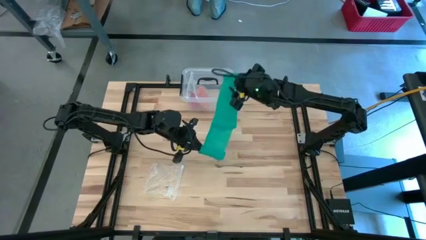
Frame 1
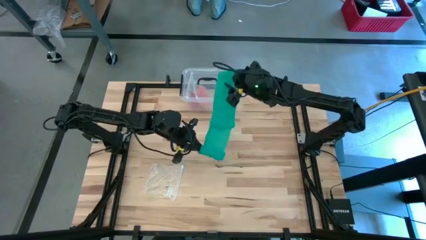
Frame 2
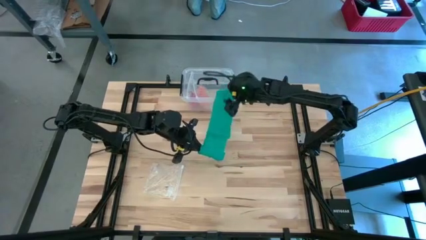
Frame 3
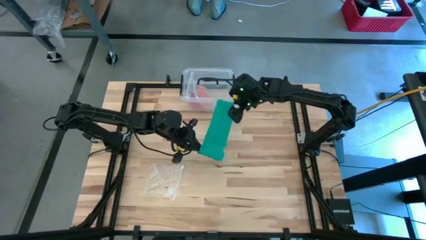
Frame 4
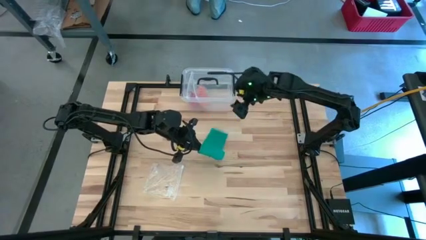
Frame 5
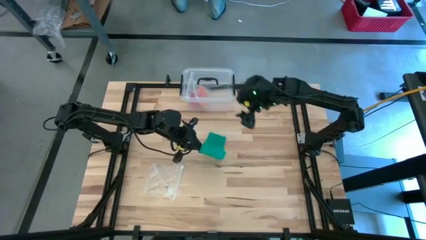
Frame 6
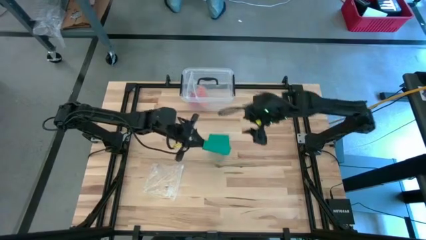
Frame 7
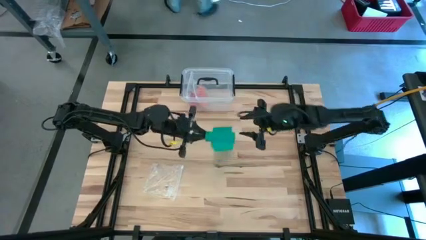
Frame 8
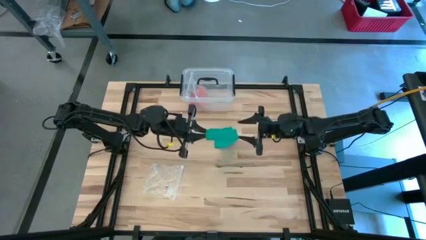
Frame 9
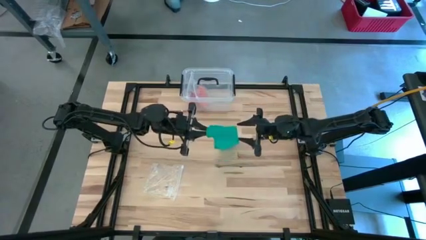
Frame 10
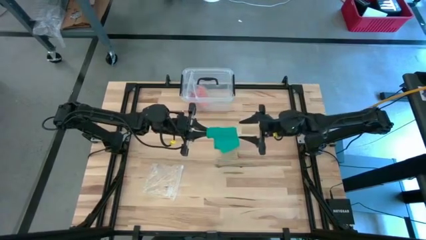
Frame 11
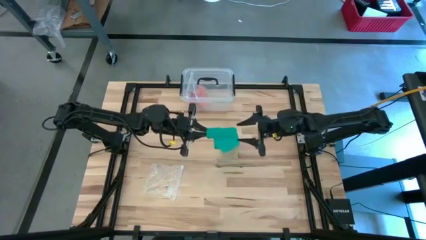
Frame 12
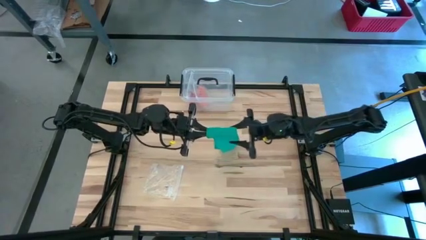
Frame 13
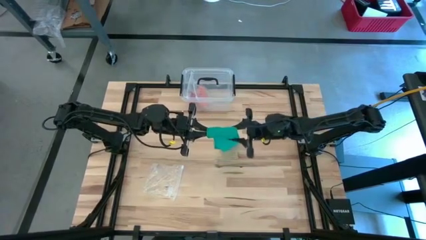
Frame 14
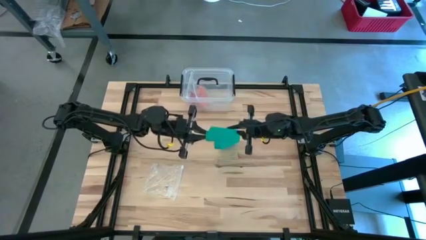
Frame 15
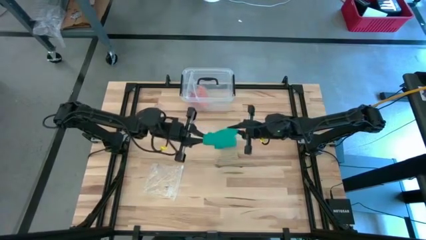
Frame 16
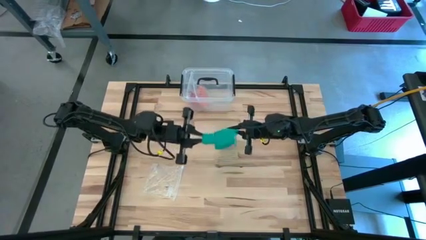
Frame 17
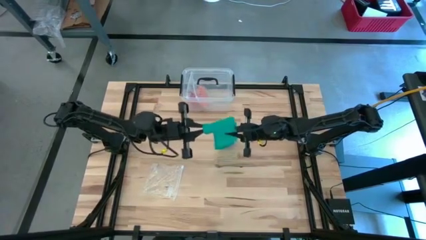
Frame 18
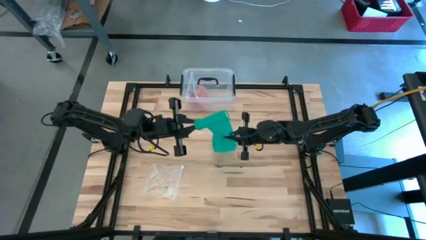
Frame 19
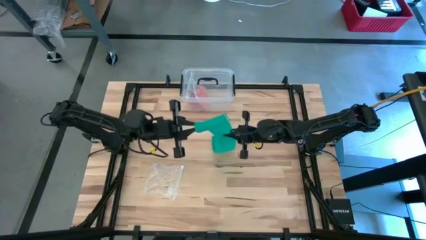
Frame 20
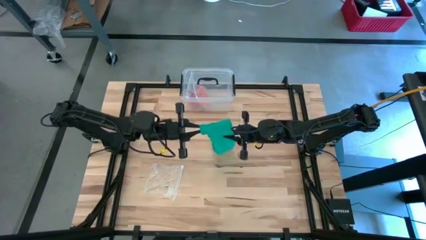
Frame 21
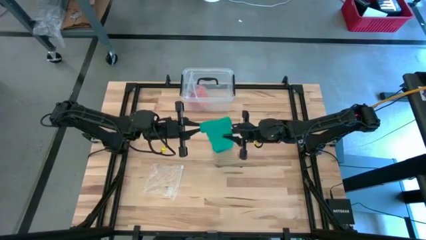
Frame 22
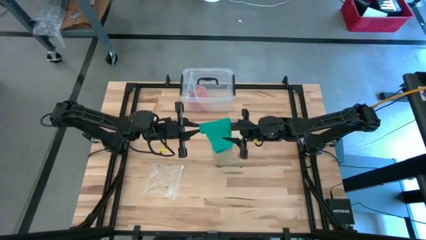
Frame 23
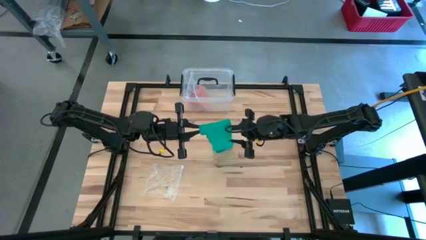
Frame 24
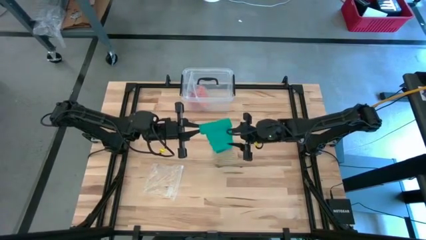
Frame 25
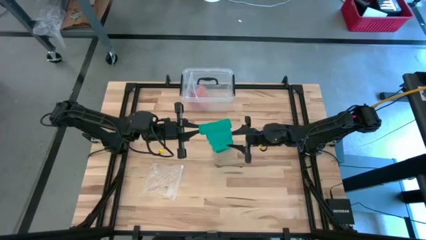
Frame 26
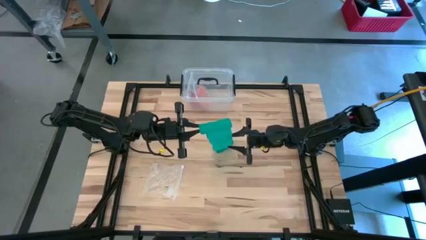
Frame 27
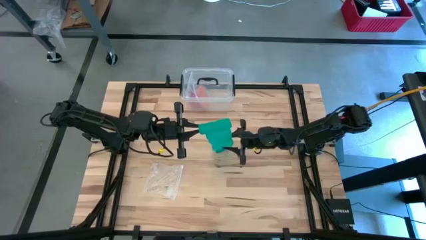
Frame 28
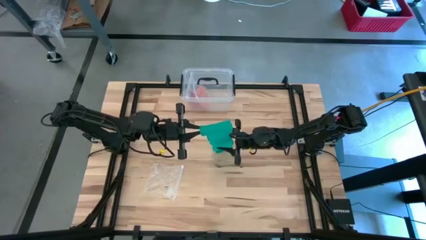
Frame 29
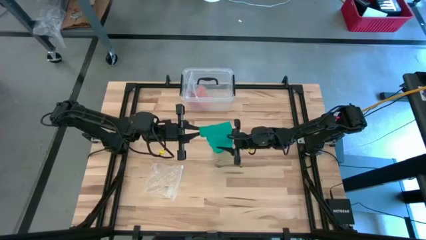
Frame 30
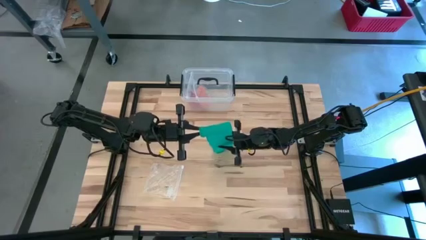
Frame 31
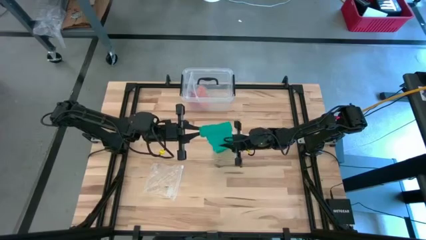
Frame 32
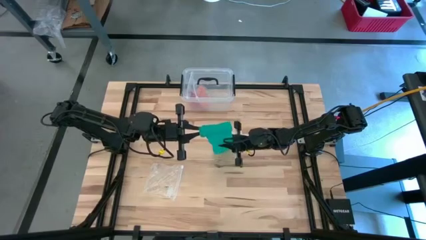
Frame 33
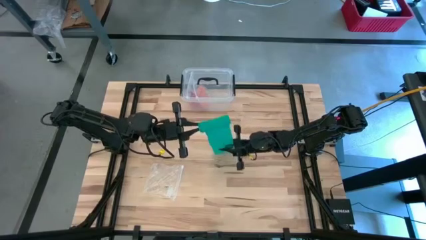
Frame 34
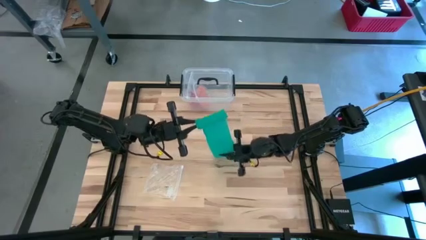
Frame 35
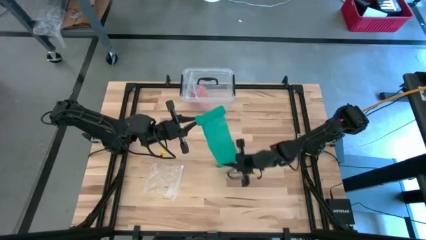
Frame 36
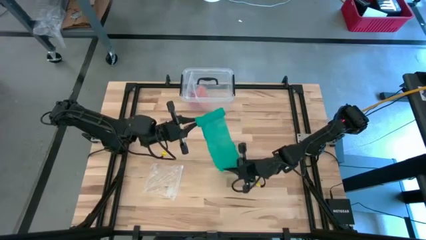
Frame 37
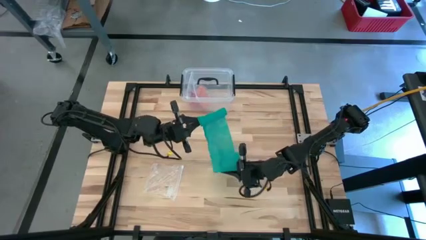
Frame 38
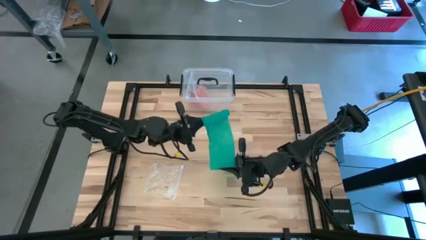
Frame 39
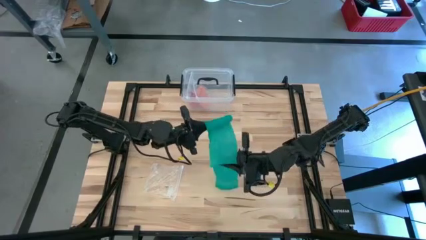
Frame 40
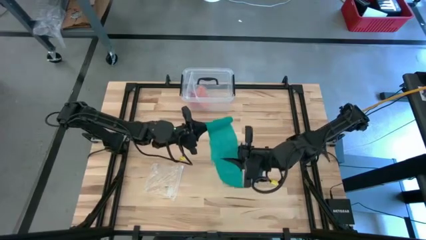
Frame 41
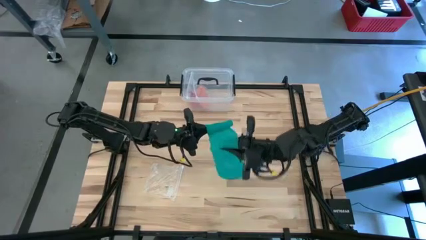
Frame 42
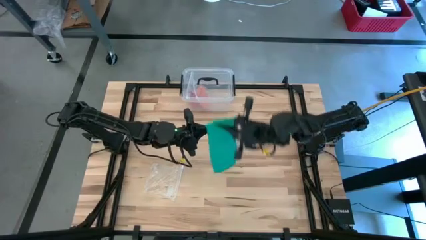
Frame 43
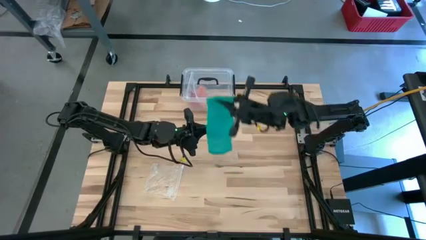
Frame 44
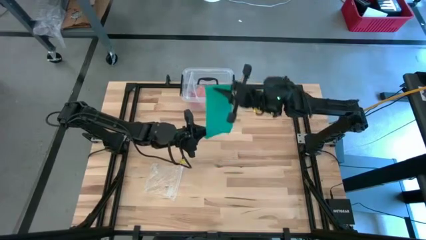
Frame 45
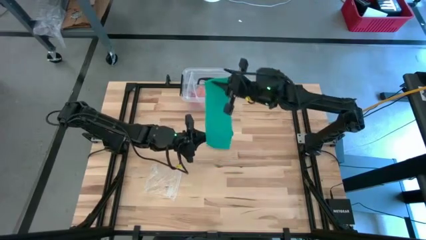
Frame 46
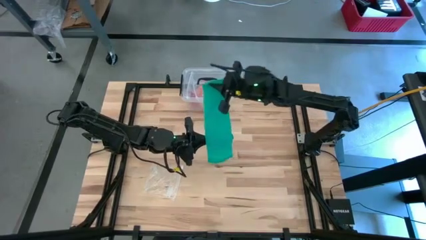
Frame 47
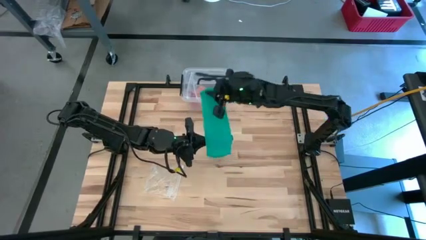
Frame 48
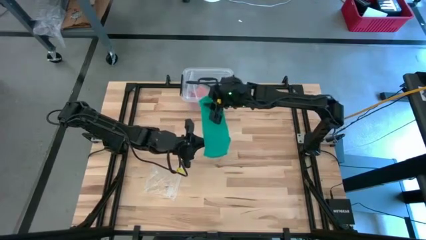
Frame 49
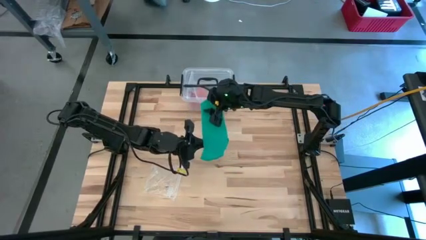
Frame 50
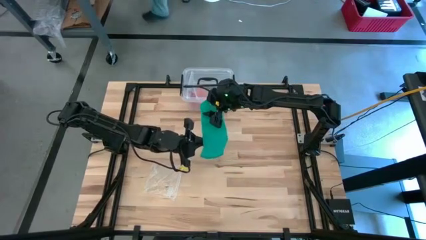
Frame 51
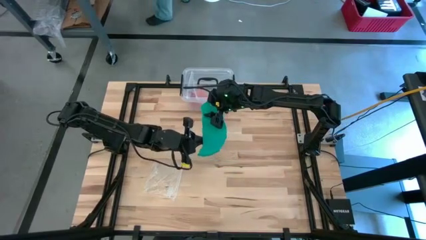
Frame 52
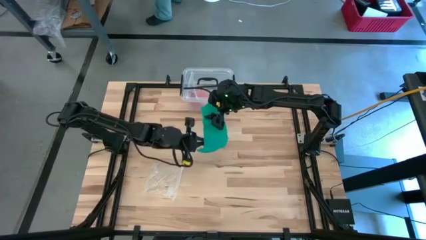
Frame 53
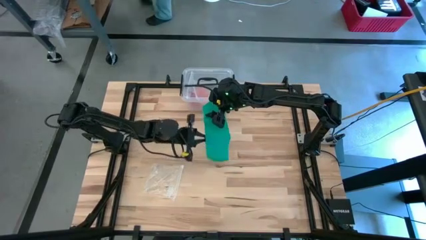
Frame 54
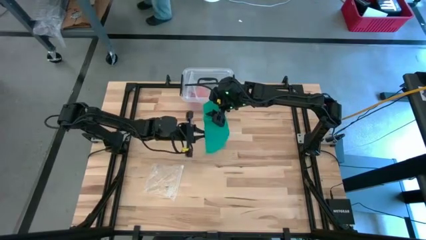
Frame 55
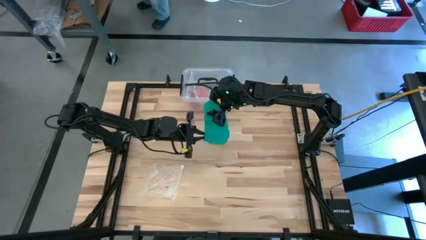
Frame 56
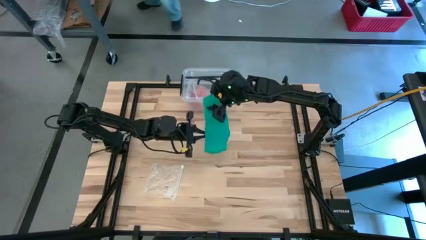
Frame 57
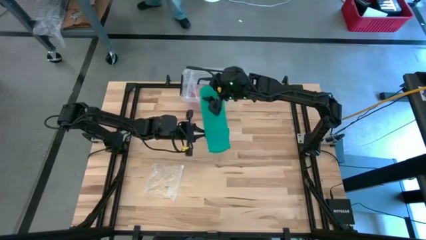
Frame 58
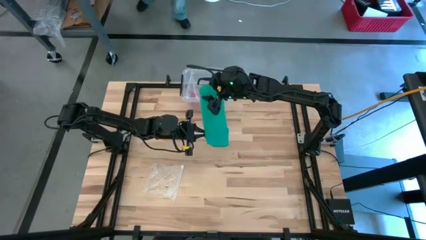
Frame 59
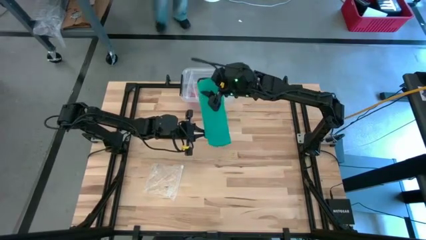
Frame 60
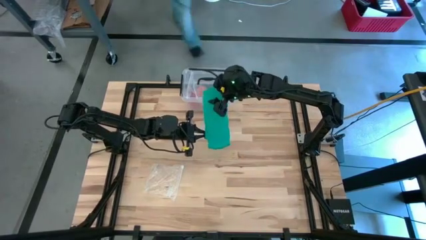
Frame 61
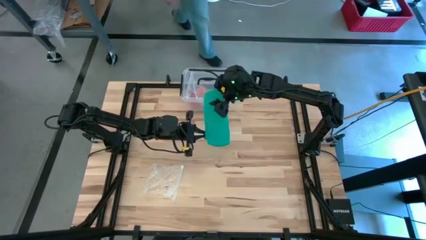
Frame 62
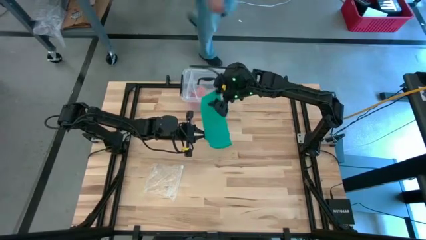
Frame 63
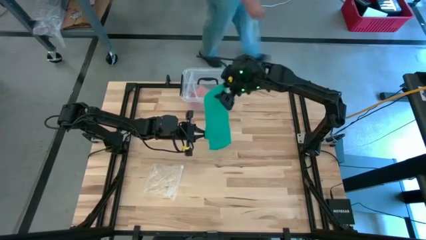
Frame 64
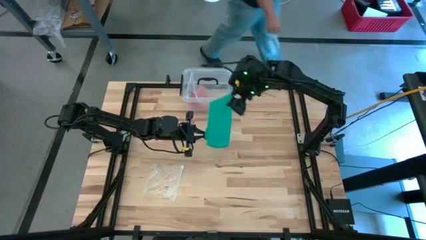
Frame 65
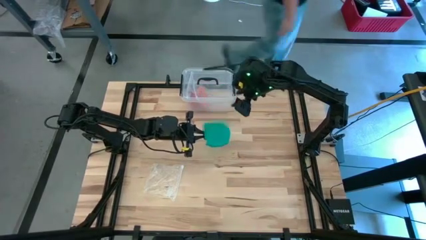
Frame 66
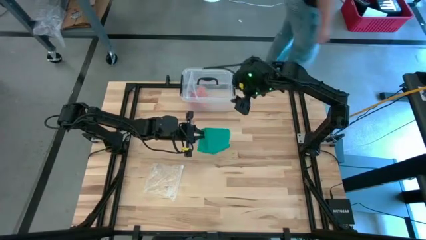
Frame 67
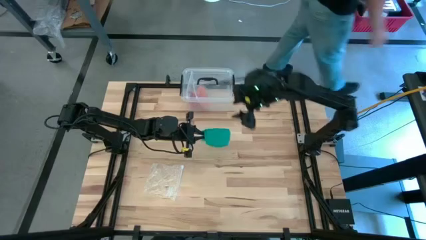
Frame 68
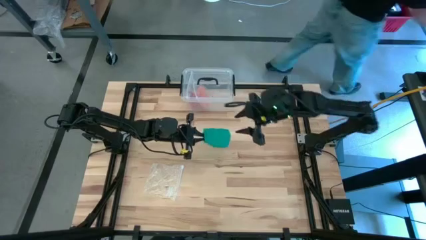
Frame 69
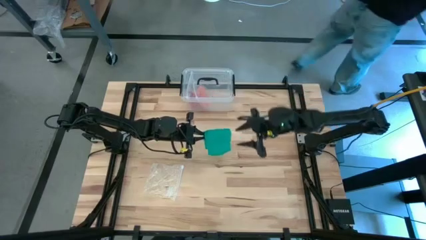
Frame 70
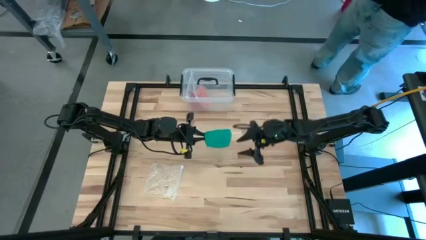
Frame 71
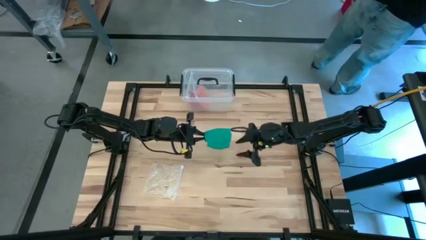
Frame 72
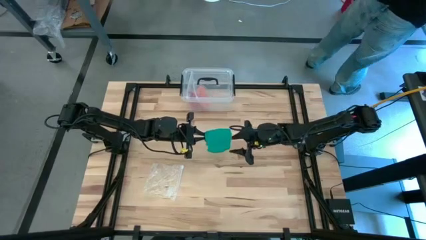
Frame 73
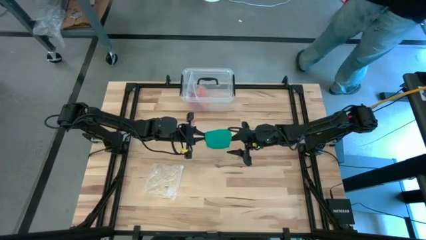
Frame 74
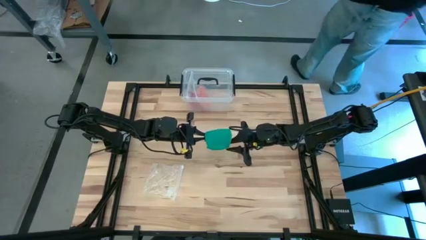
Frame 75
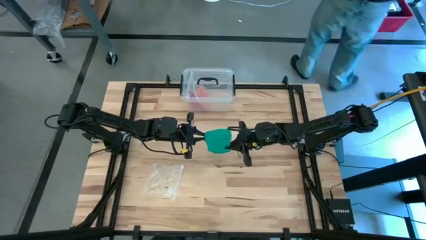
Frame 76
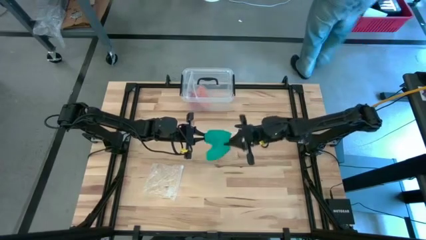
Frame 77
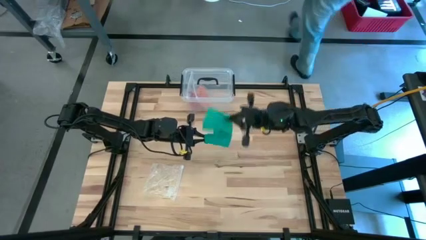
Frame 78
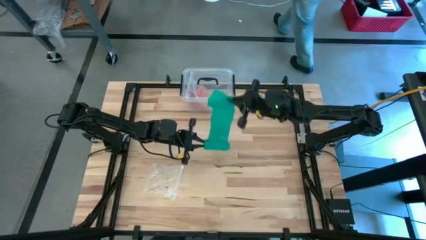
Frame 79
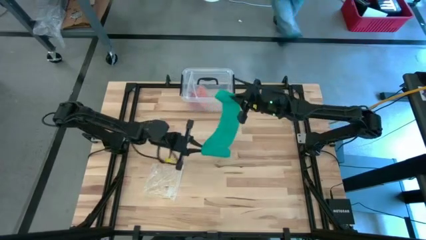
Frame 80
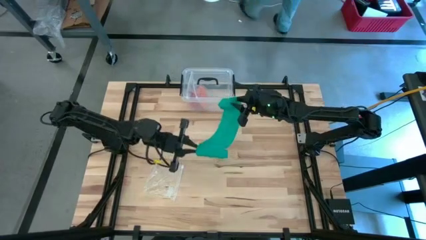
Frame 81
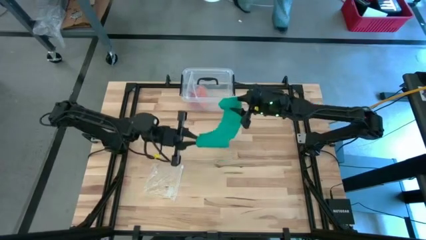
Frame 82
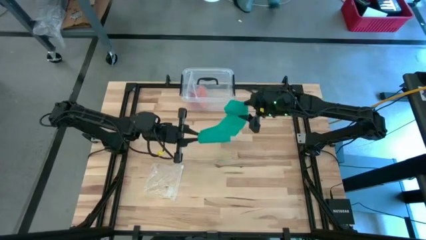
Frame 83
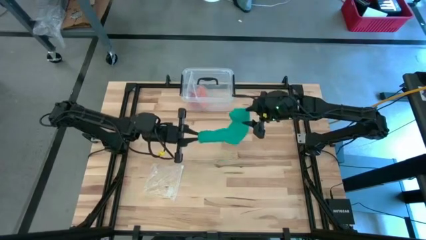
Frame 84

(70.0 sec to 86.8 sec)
Task: Roll bandage
Roll the green bandage
